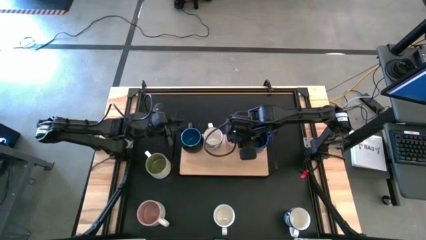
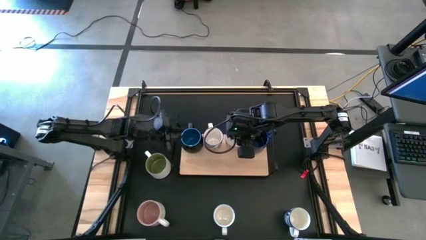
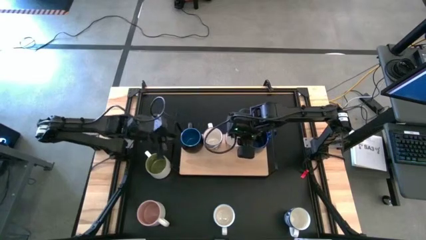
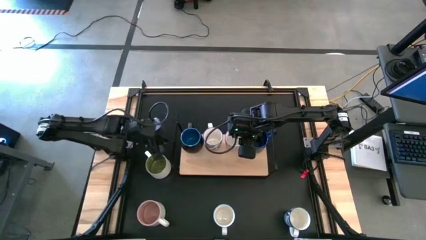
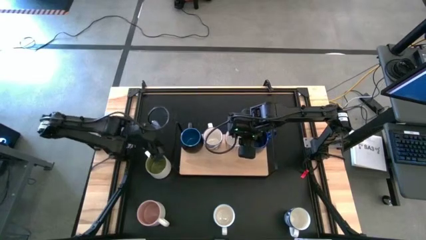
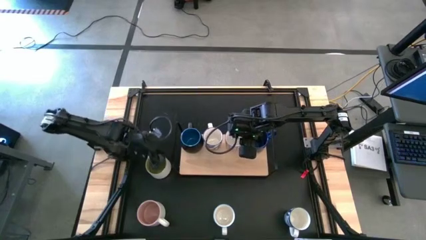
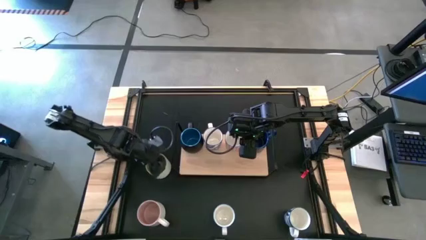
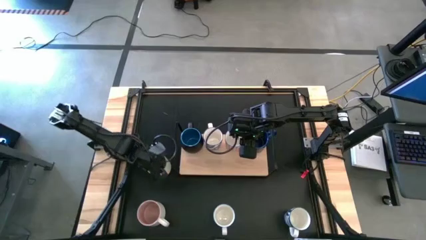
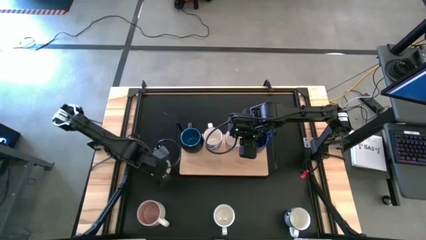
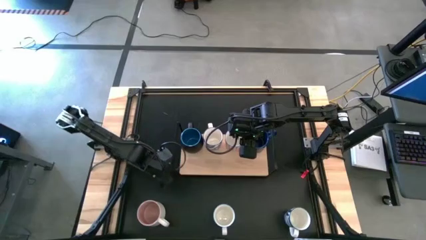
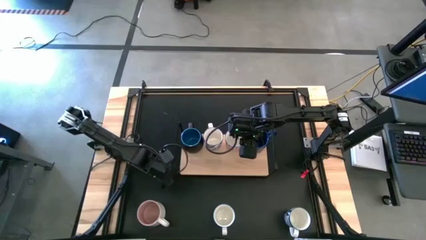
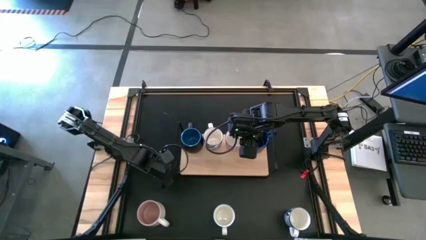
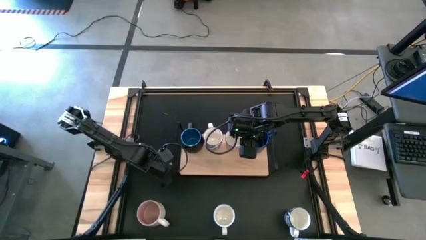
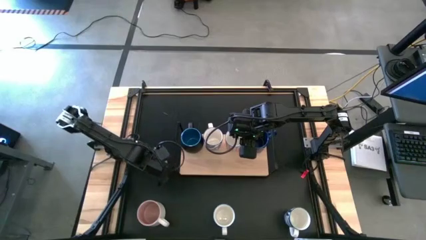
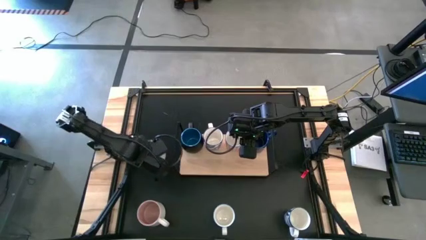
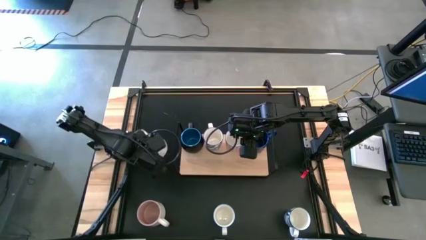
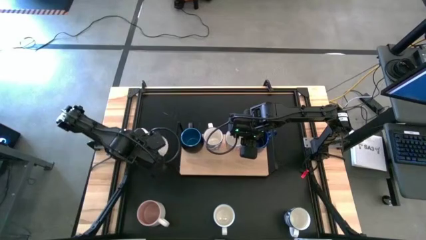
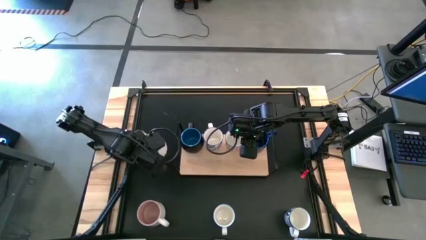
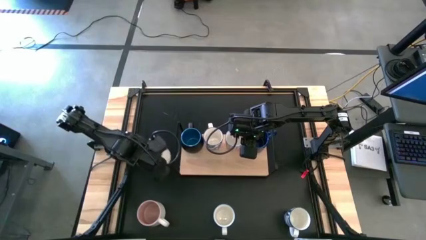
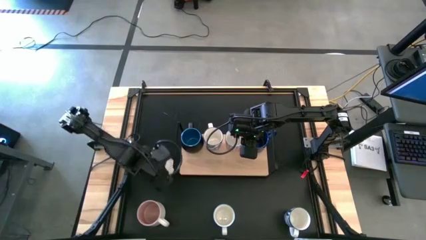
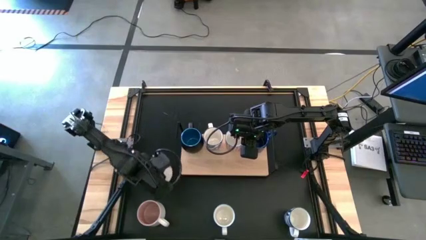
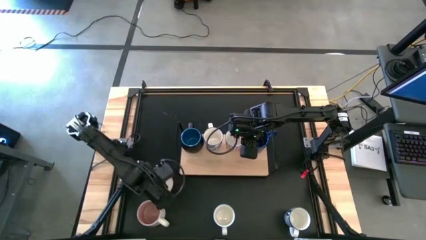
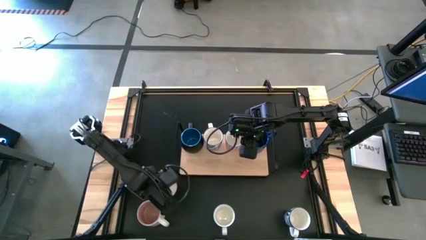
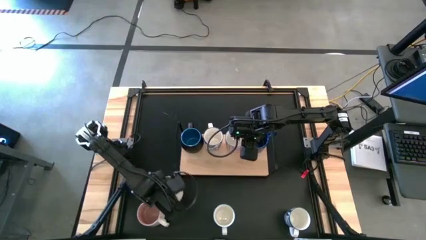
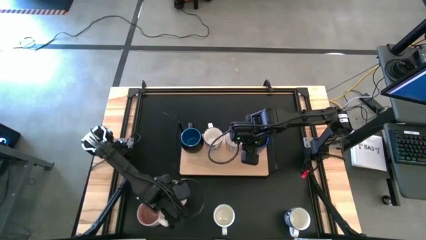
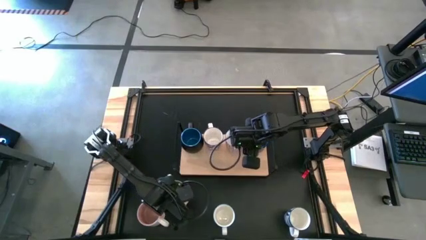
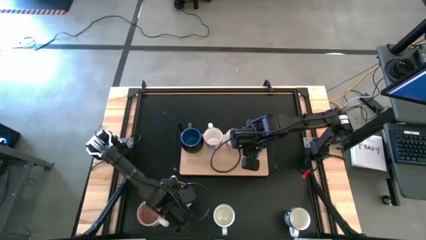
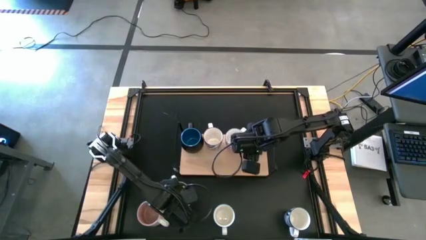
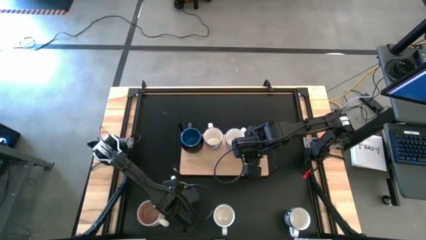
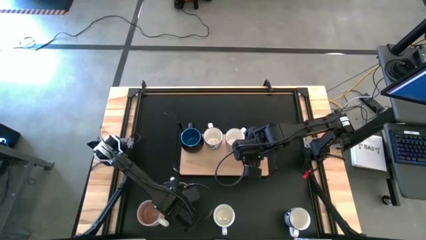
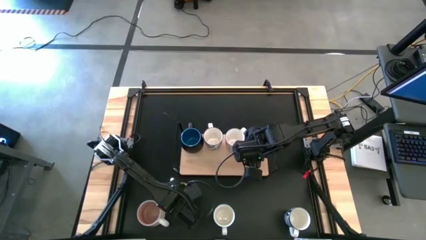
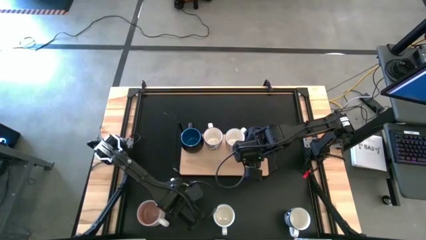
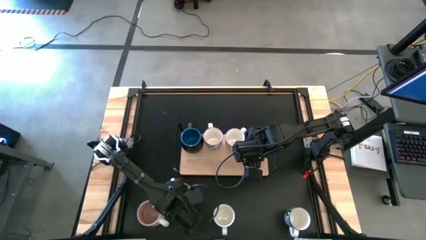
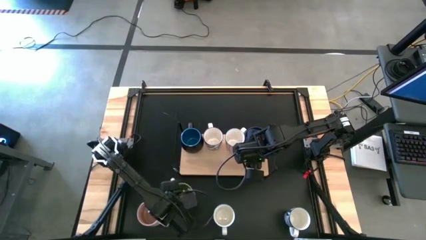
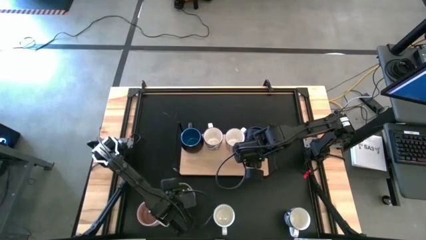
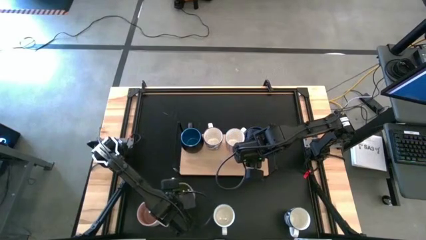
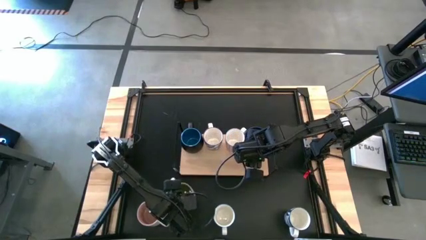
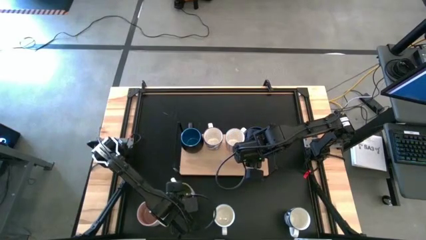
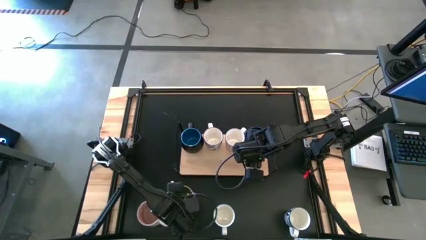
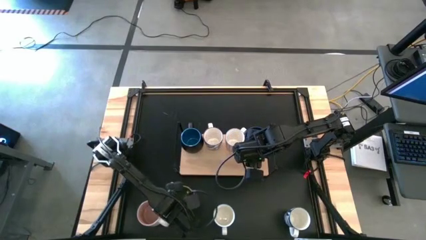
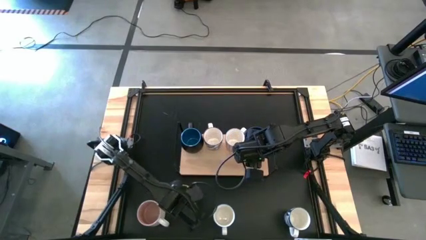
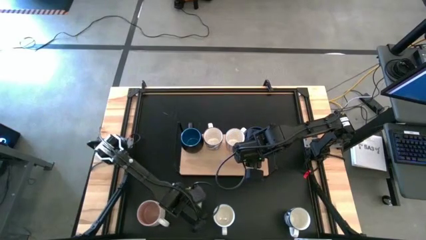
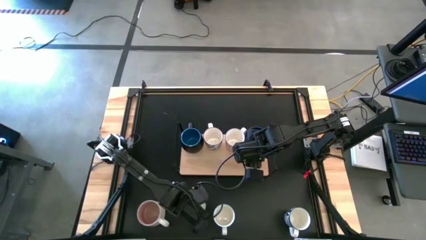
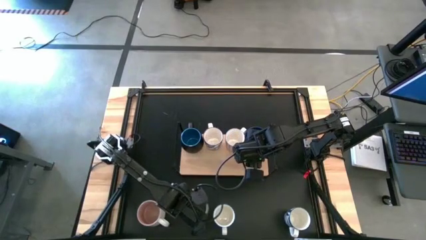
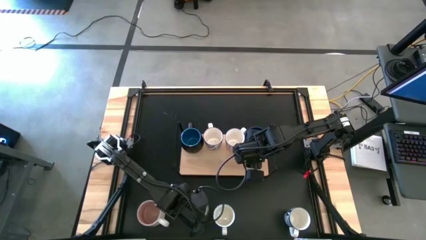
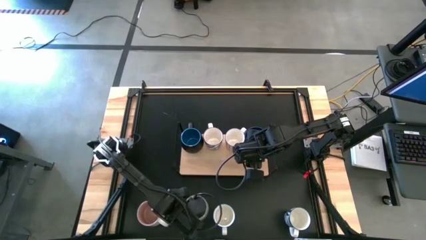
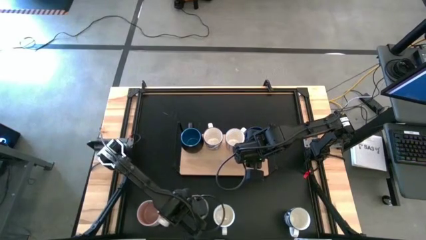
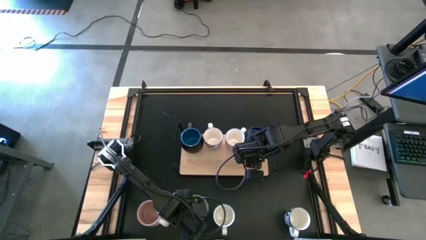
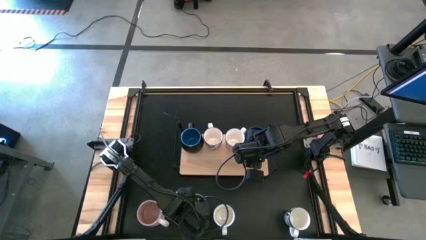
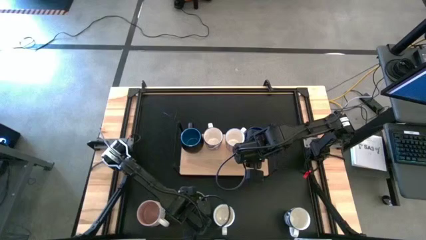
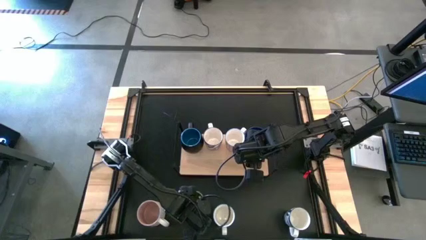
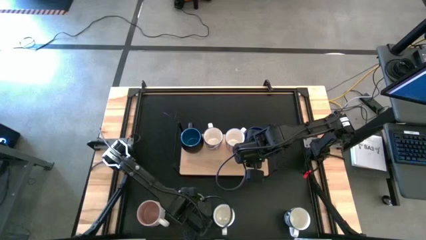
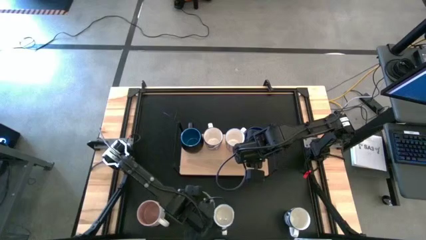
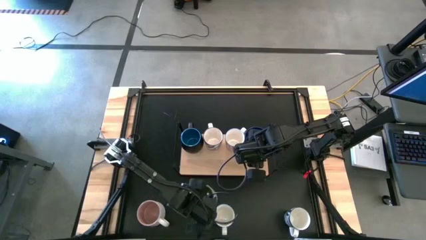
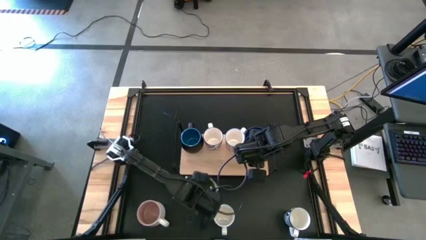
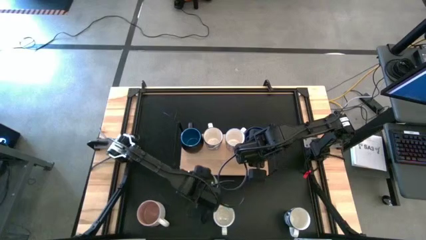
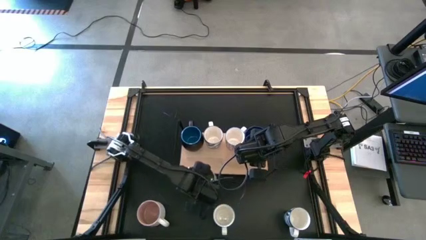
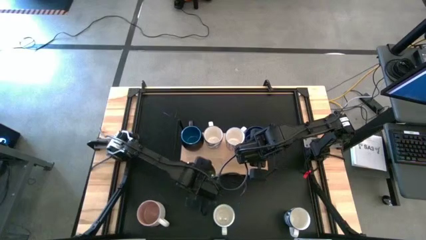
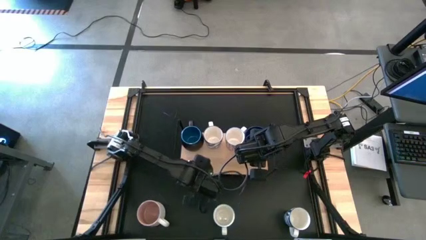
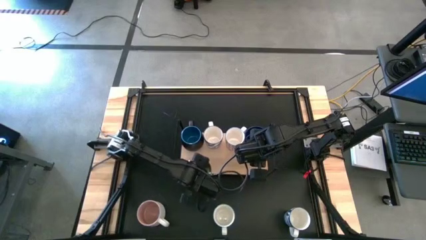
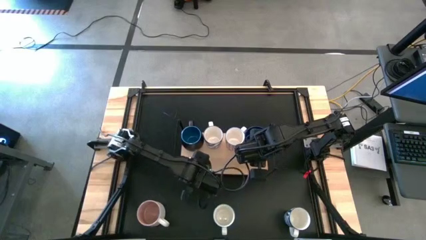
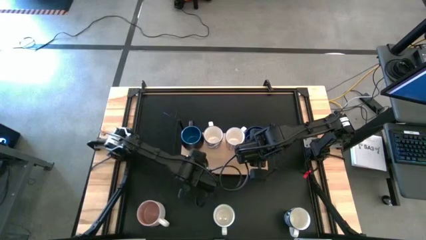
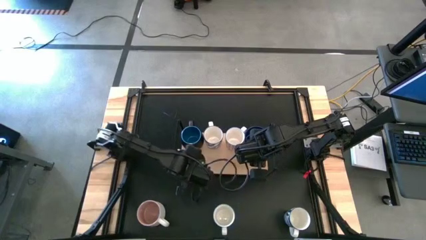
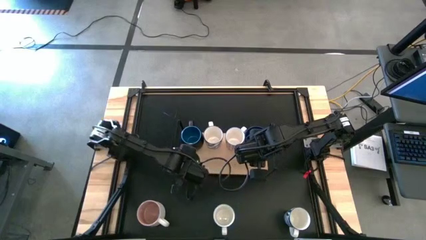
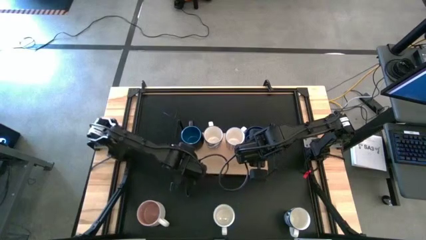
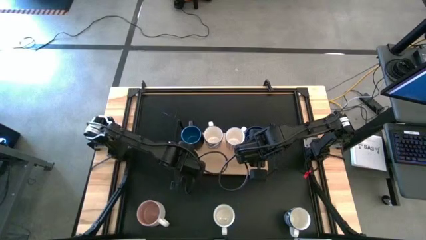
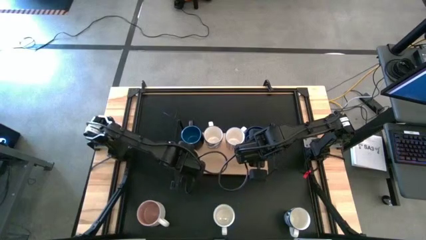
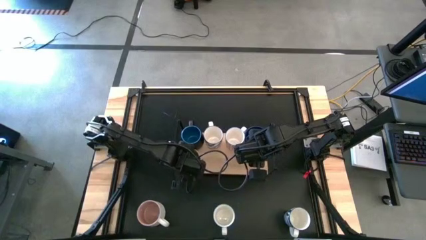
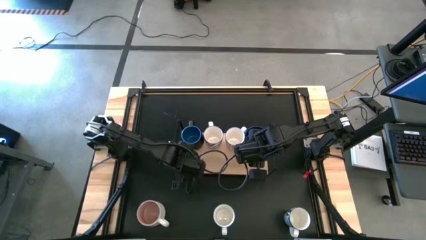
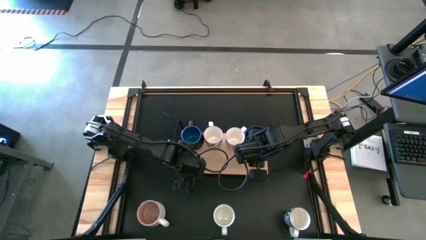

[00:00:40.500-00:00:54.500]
Task: Place coffee mugs
Put the green mug on the shelf
